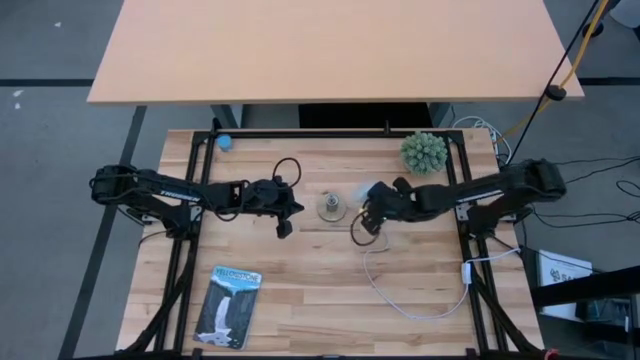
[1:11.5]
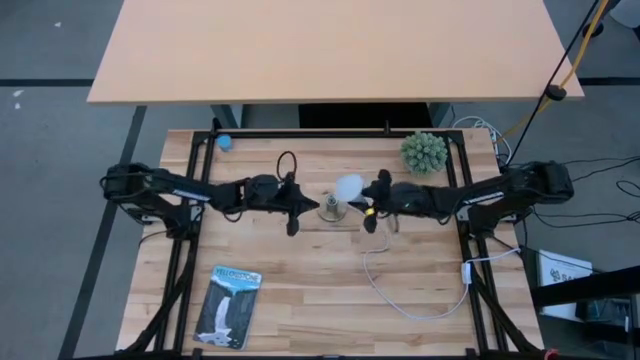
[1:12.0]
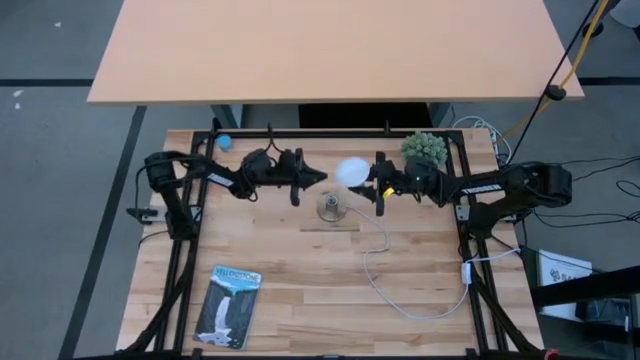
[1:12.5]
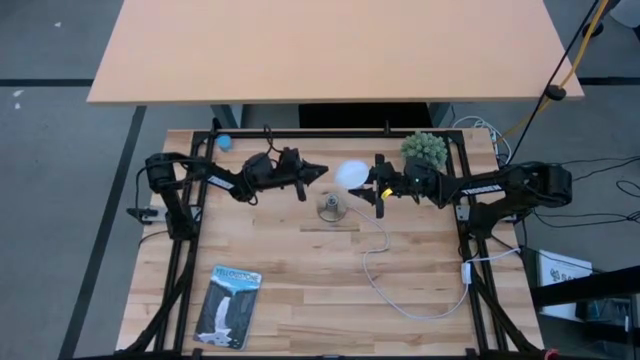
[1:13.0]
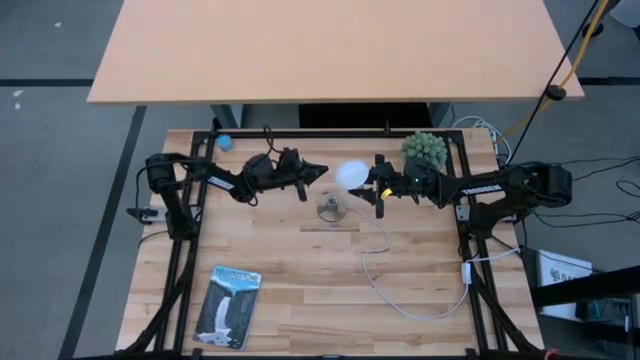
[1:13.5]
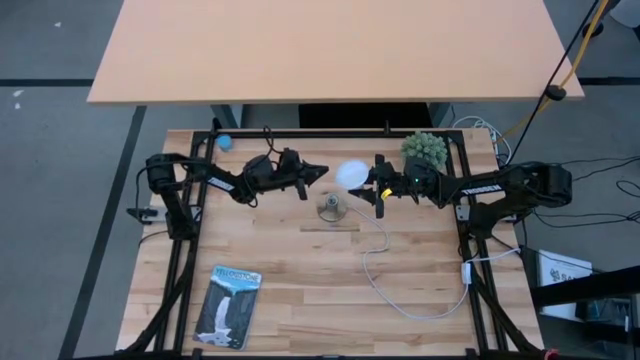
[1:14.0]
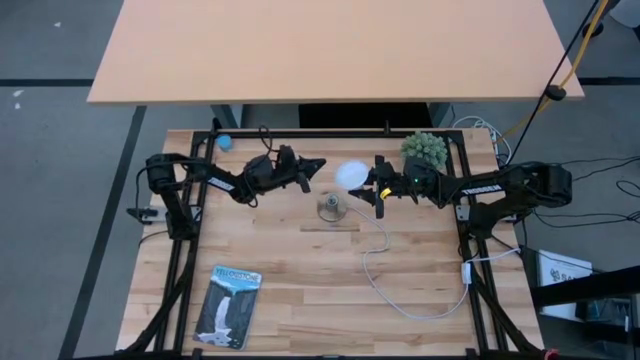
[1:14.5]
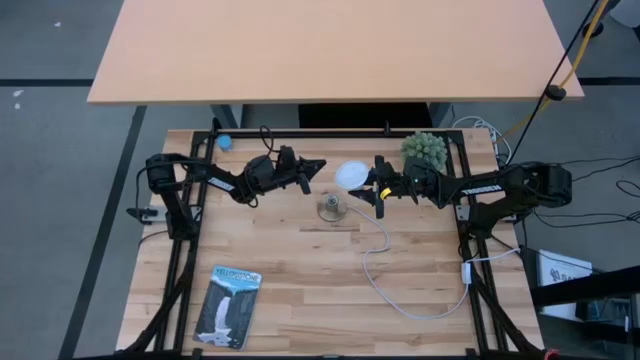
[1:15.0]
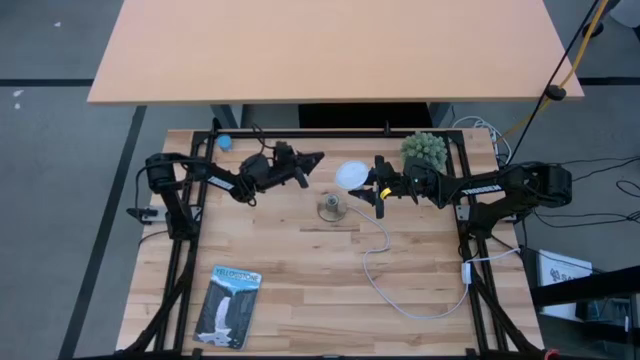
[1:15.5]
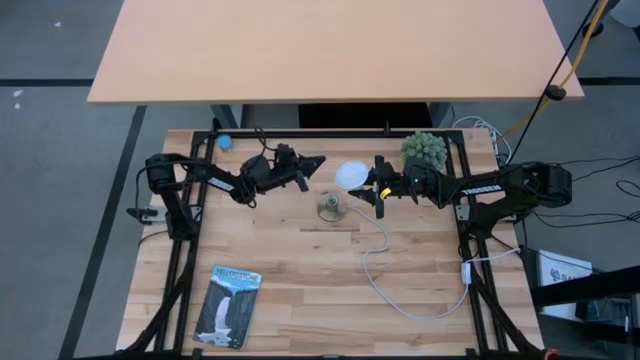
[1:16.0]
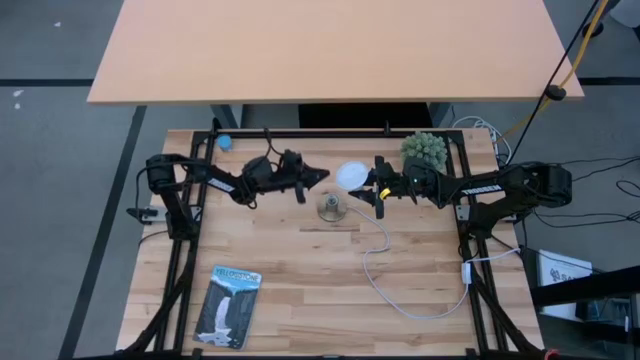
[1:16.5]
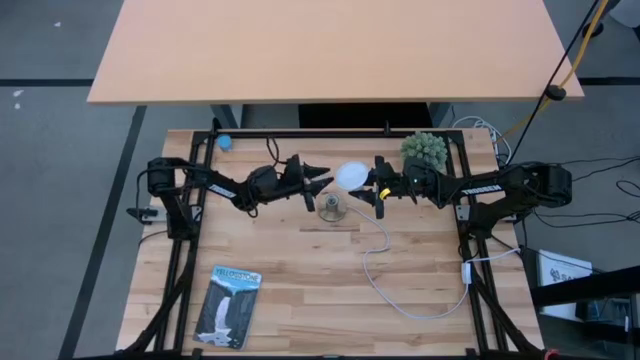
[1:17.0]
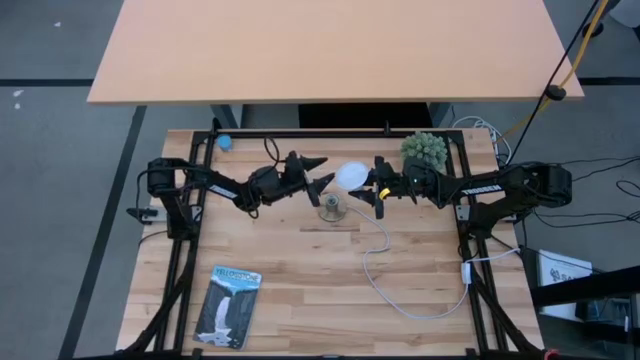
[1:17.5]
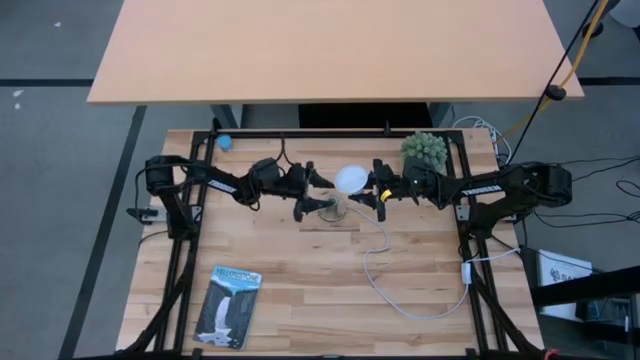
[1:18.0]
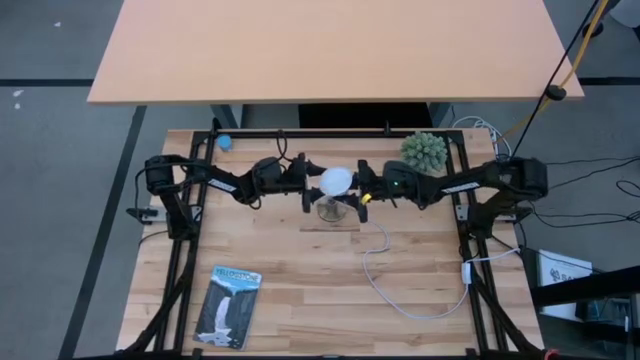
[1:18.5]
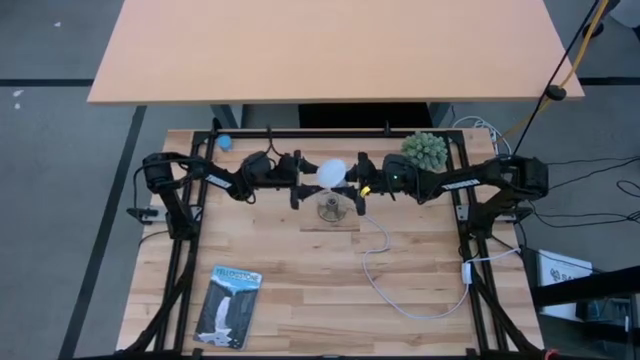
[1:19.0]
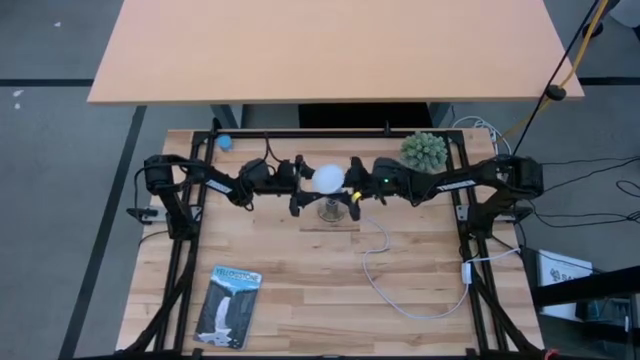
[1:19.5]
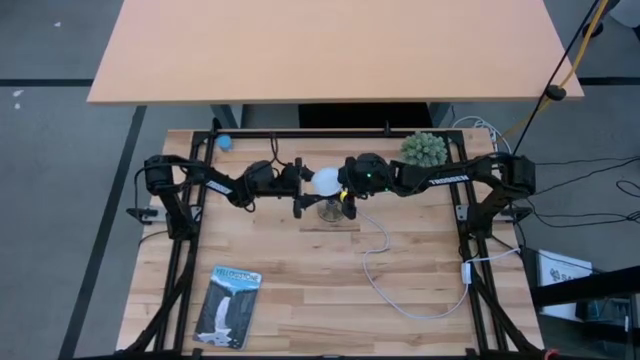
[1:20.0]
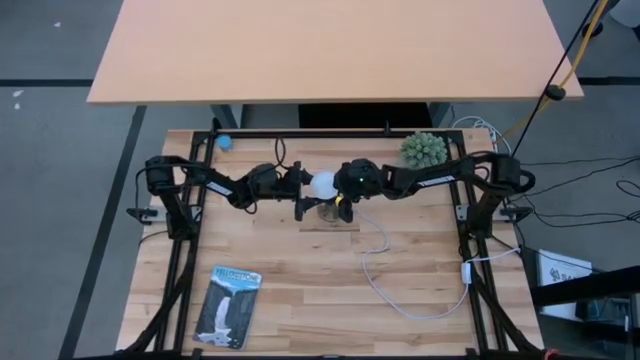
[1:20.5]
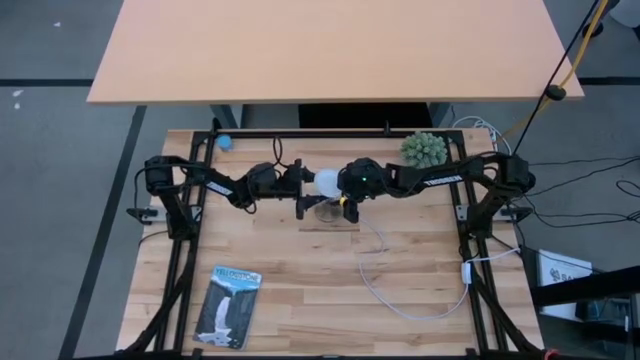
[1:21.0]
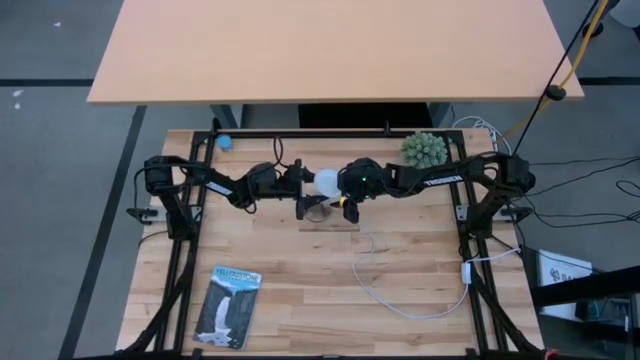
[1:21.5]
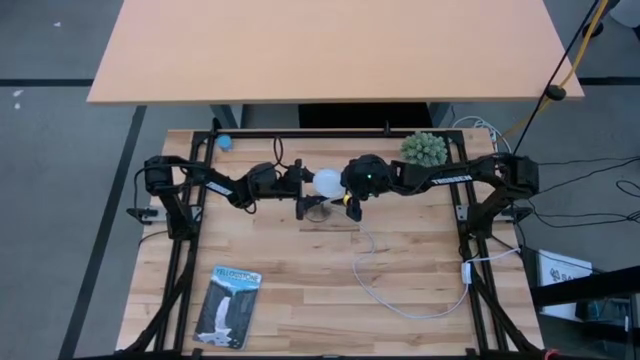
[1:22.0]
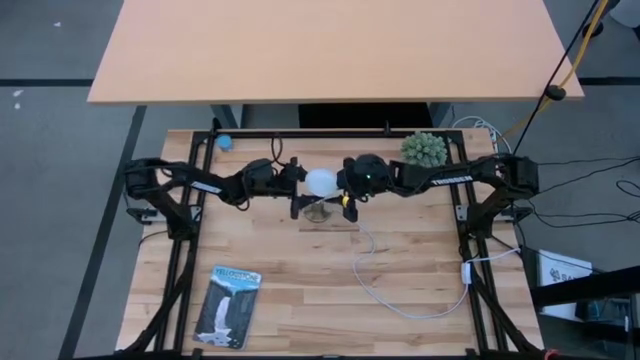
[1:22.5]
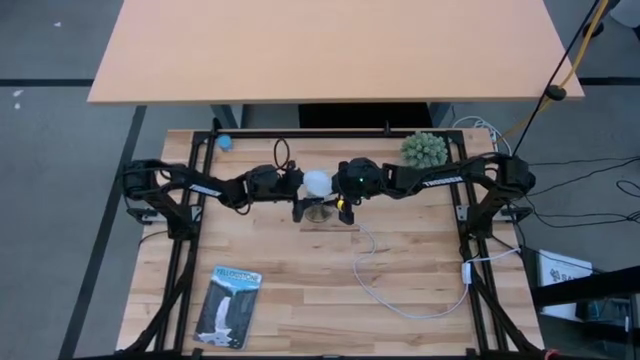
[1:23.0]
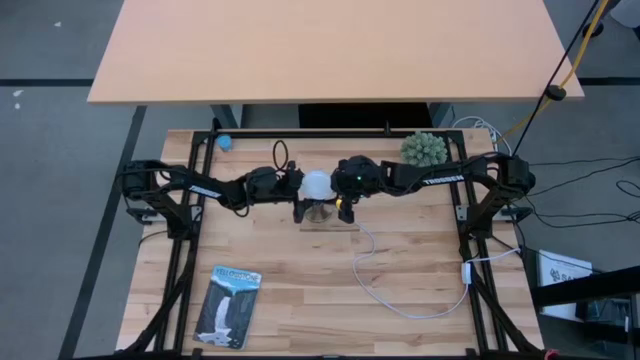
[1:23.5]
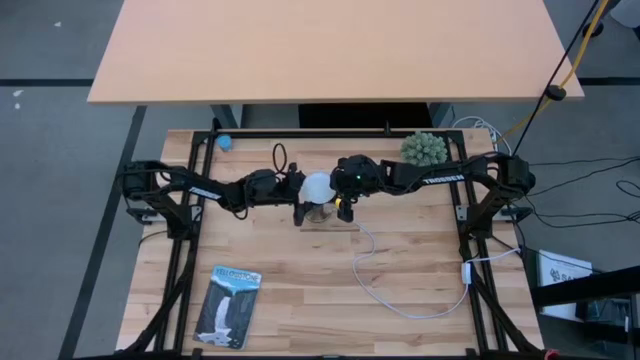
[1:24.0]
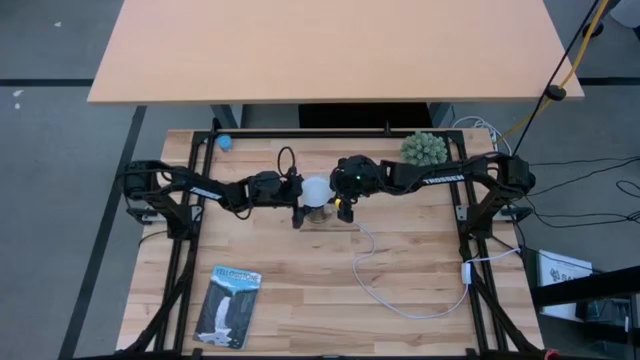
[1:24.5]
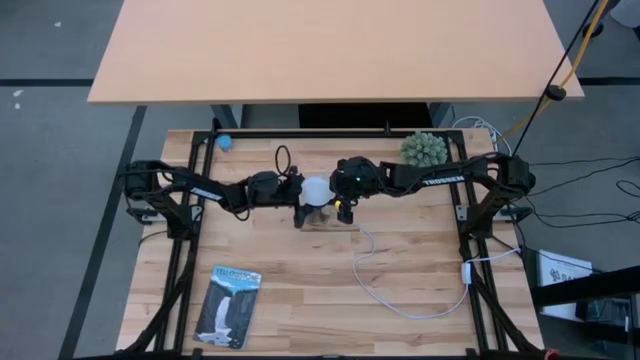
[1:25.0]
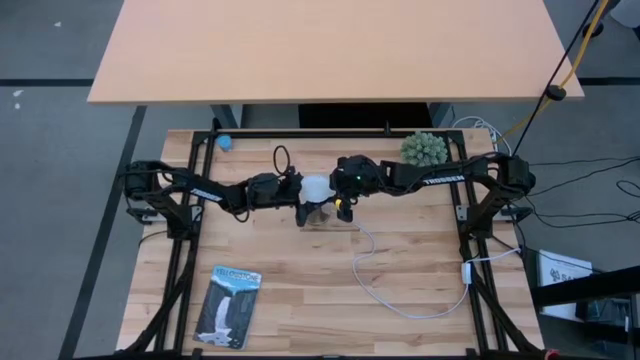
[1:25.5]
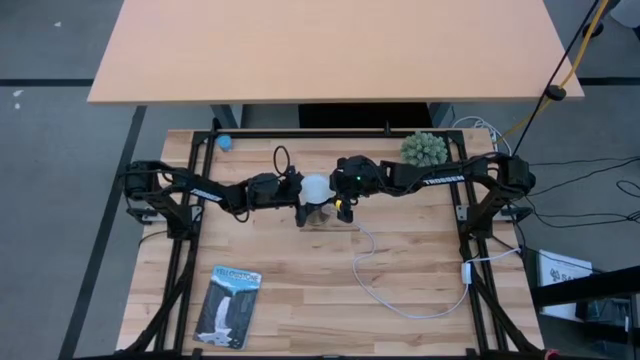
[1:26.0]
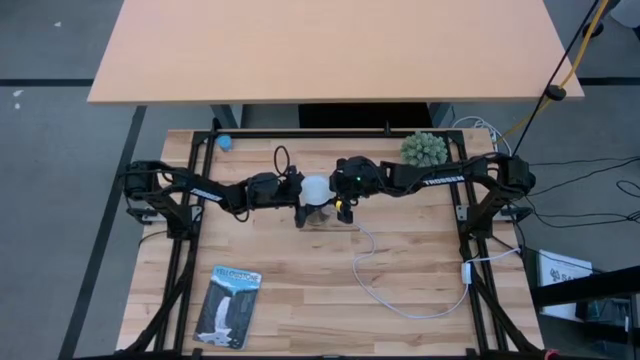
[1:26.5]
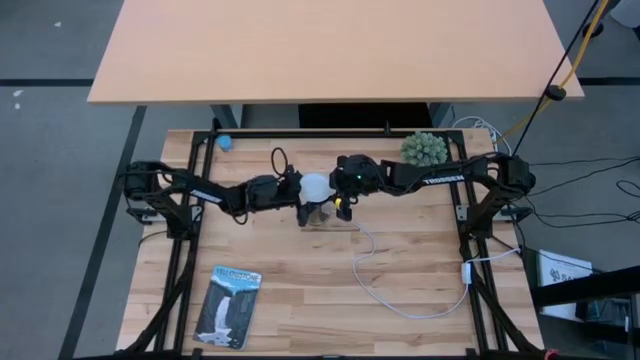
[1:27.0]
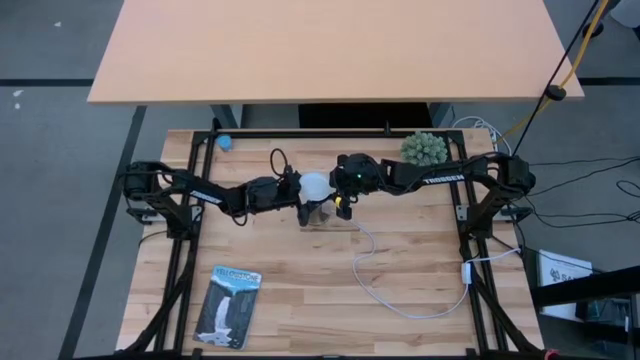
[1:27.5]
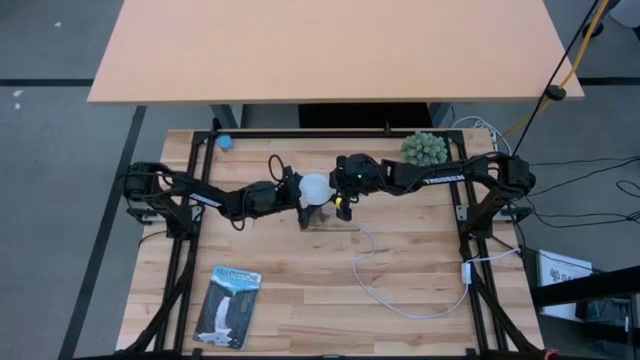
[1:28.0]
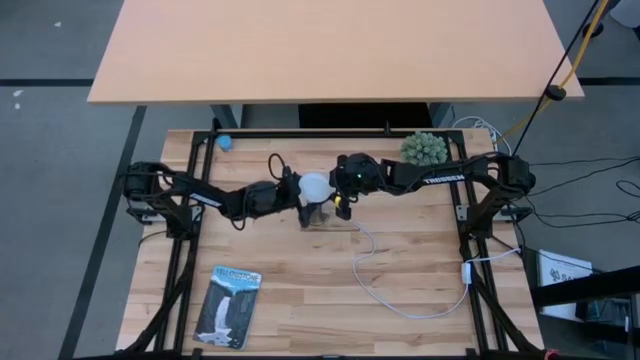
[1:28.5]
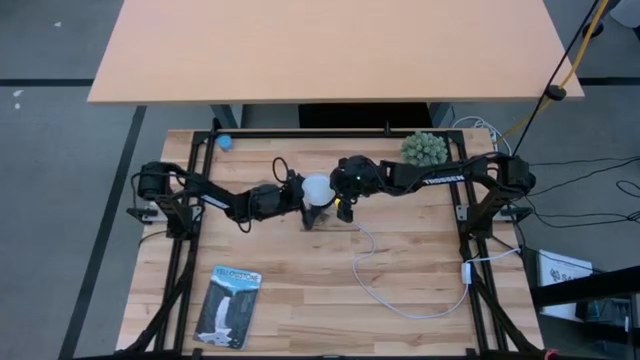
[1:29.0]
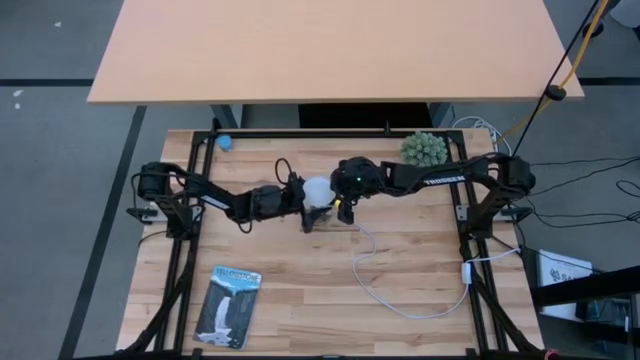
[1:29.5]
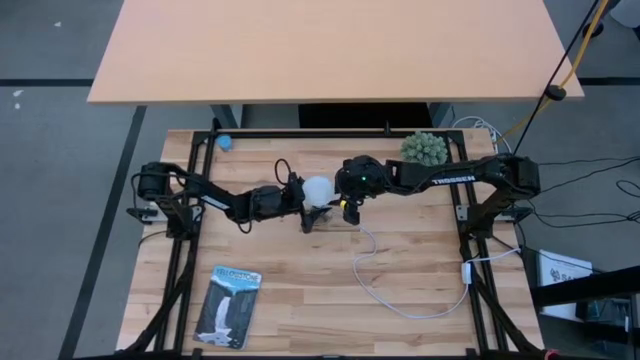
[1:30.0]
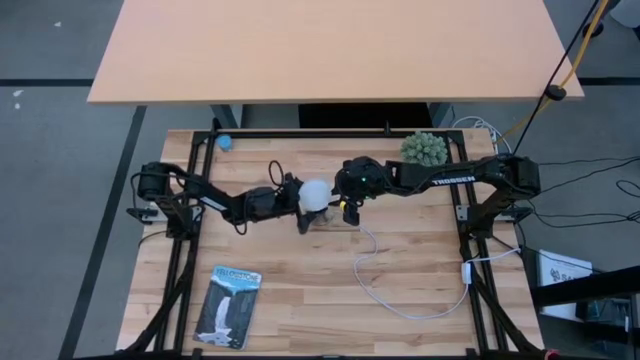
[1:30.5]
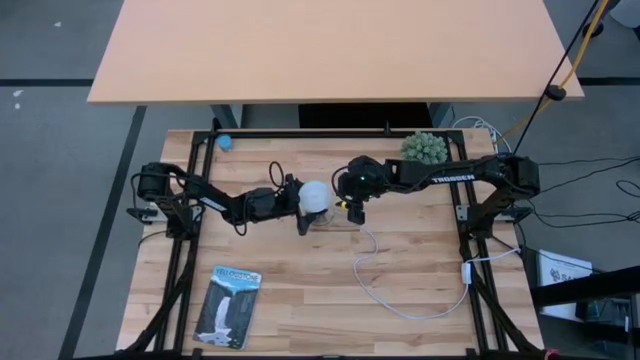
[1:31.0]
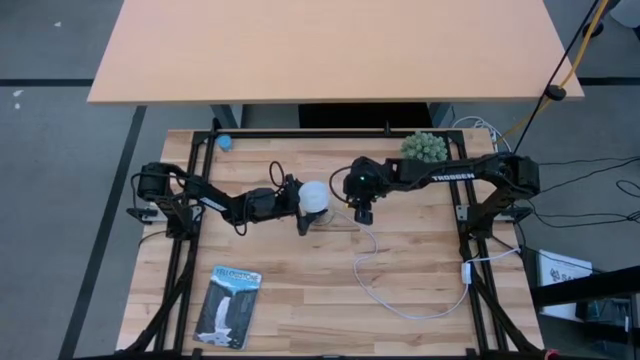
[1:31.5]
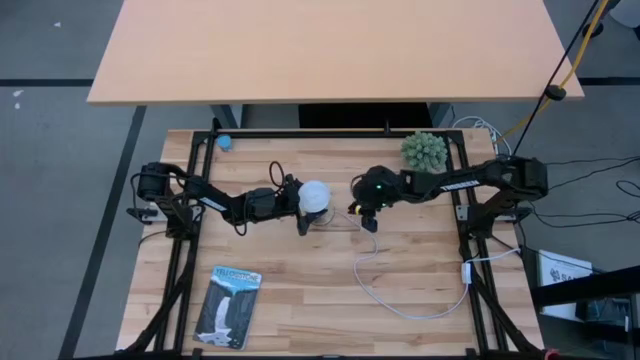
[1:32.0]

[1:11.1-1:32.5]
Task: Screw lightbulb
Insert the lightbulb into the lamp

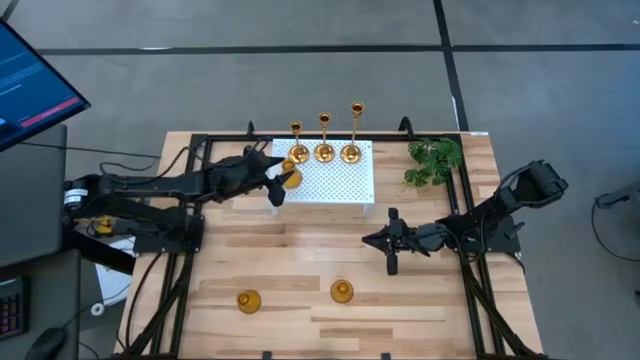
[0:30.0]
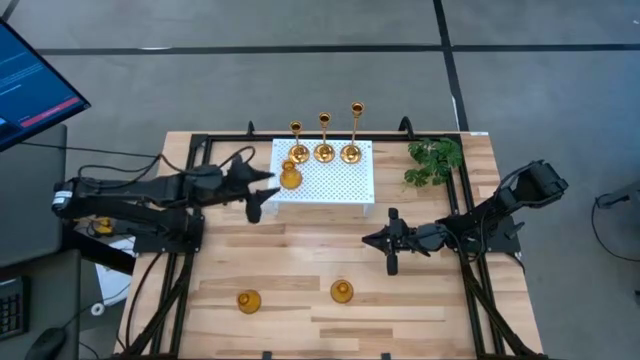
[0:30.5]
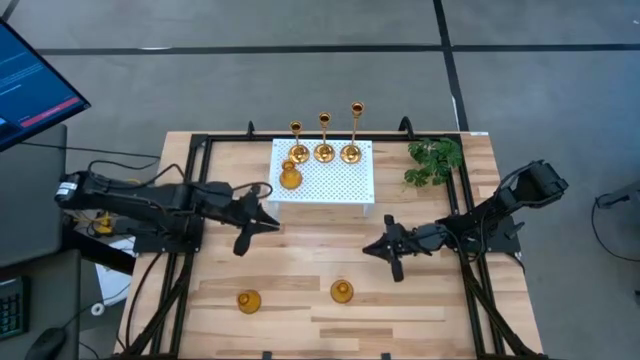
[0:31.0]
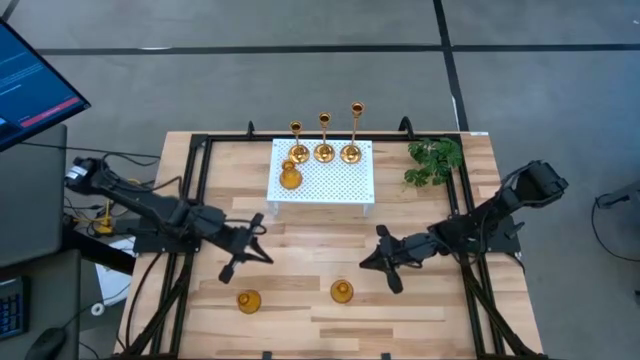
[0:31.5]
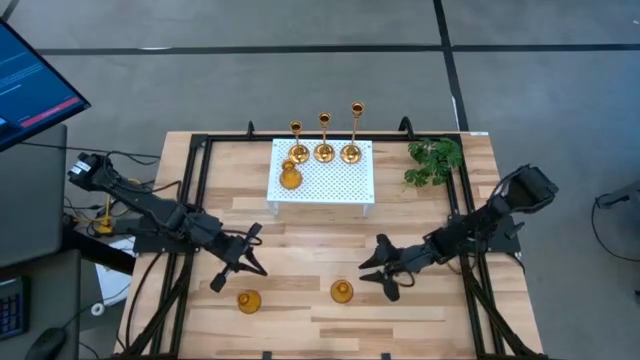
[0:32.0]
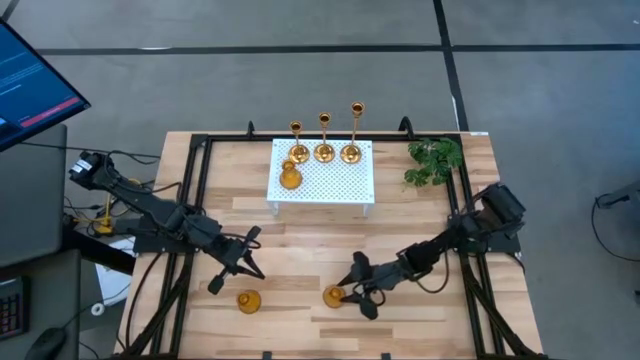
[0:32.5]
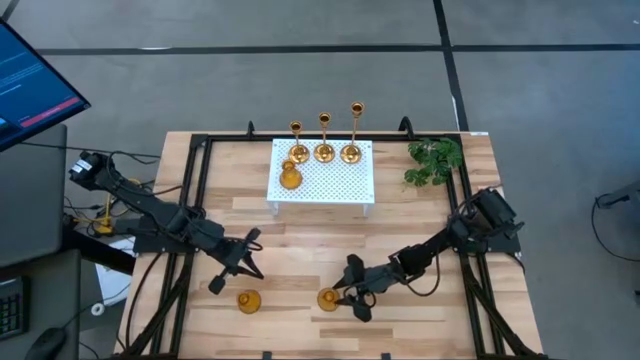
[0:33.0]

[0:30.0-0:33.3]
Task: Pick & Place candle stick holders
Put the right yellow glass candle holder on the shelf aligned with the other yellow glass candle holder
